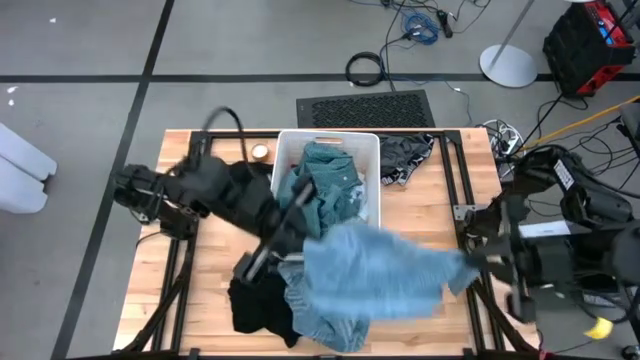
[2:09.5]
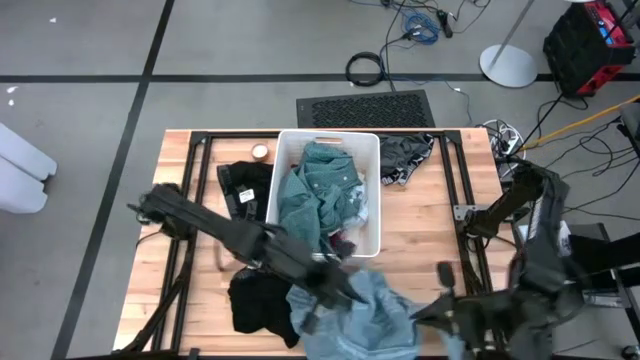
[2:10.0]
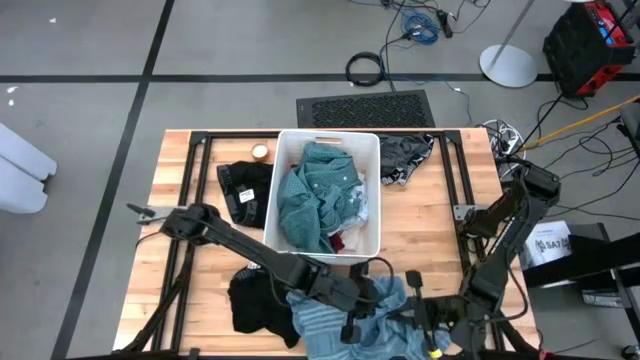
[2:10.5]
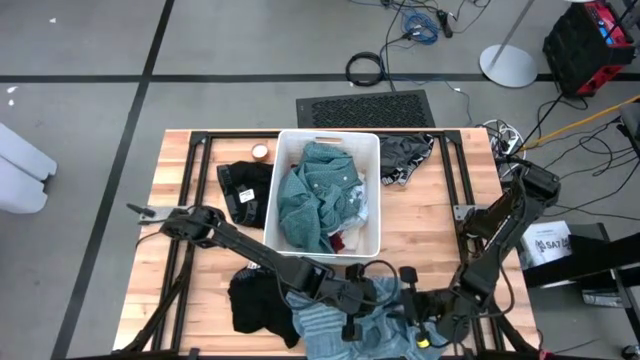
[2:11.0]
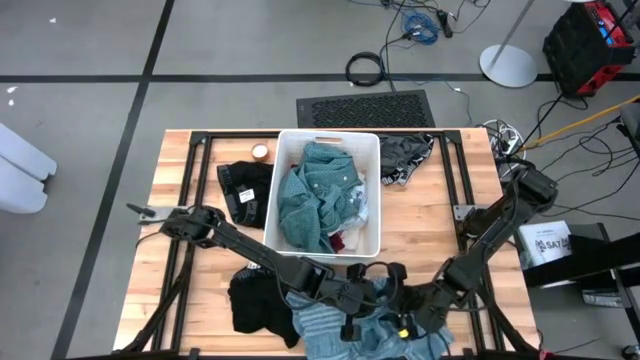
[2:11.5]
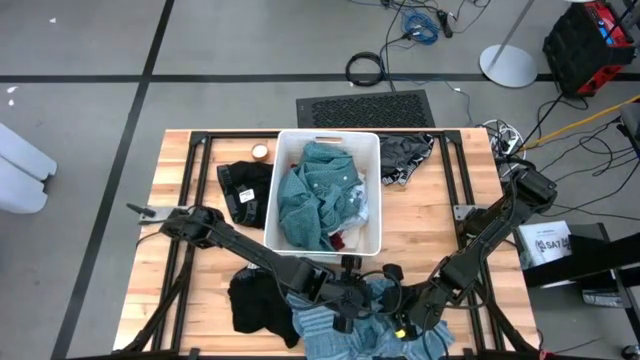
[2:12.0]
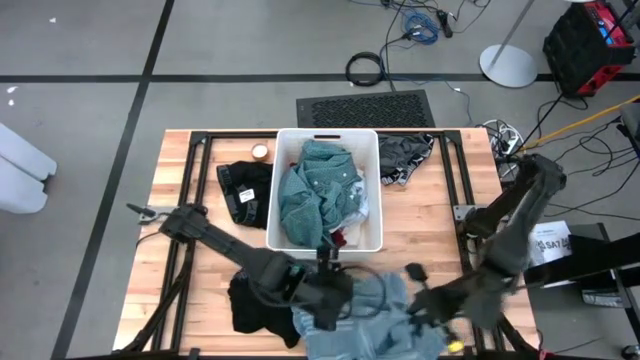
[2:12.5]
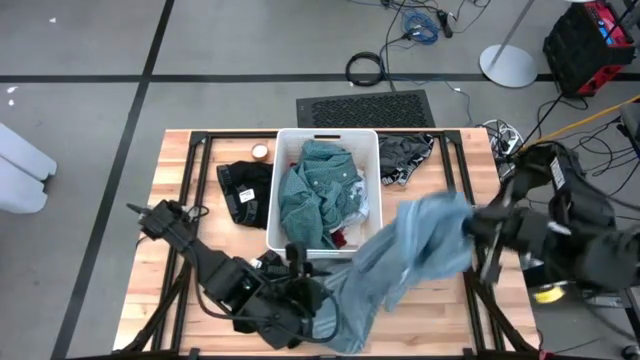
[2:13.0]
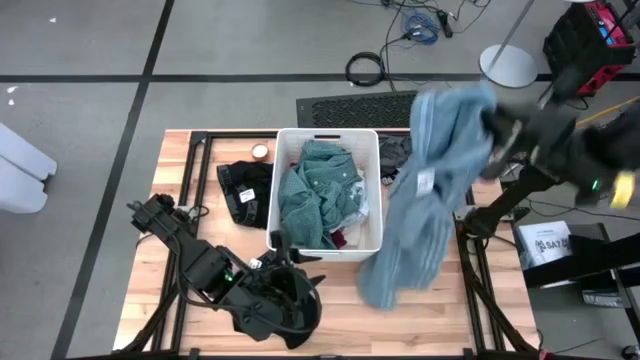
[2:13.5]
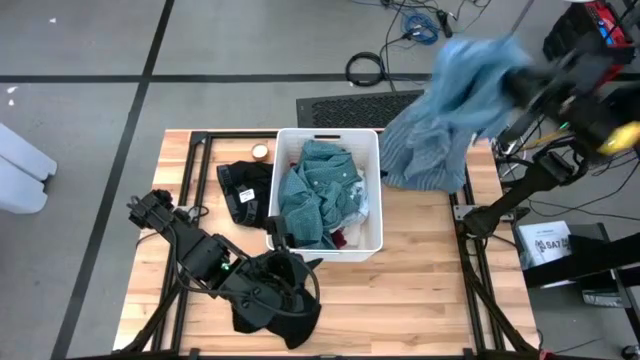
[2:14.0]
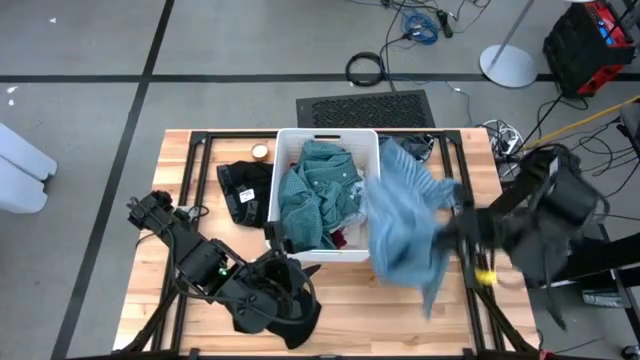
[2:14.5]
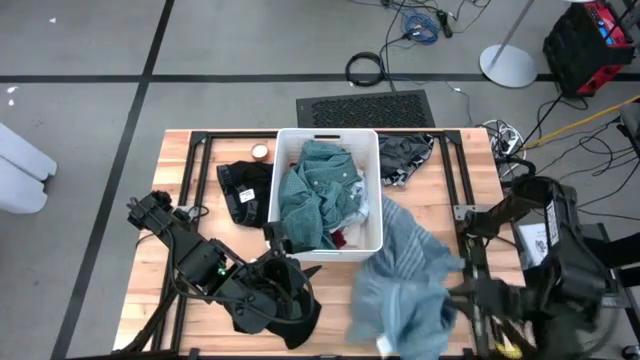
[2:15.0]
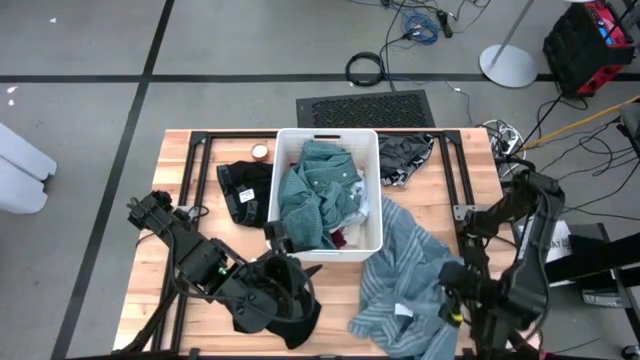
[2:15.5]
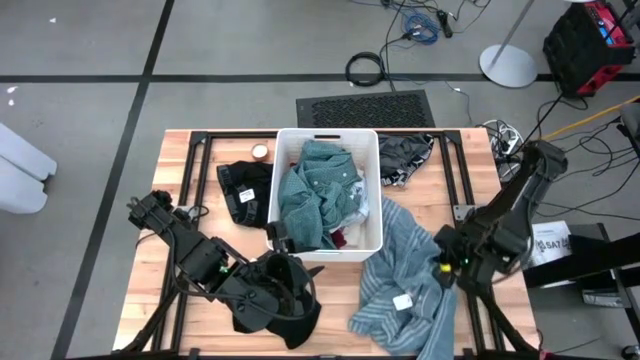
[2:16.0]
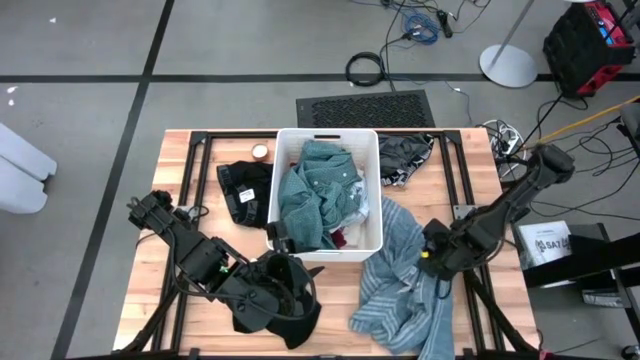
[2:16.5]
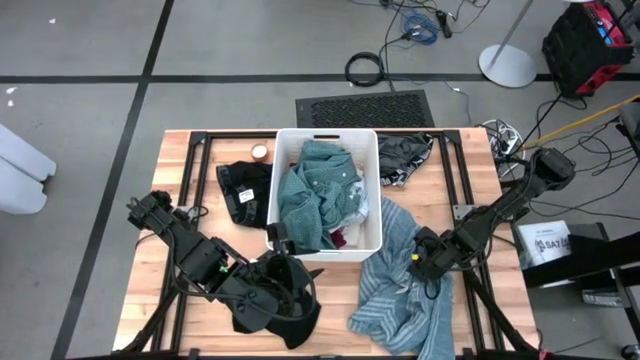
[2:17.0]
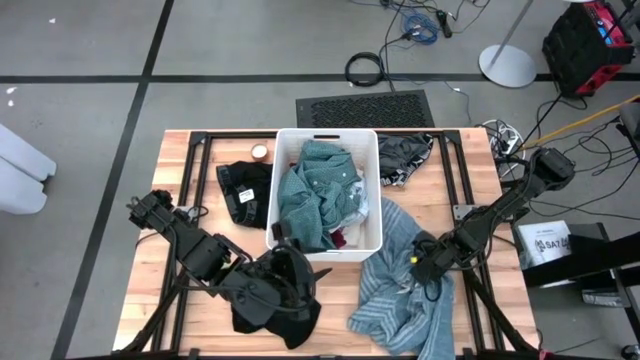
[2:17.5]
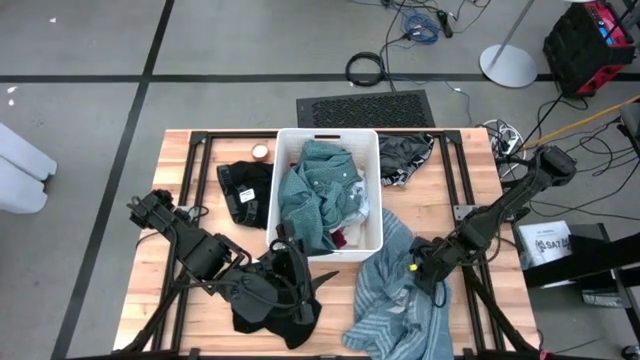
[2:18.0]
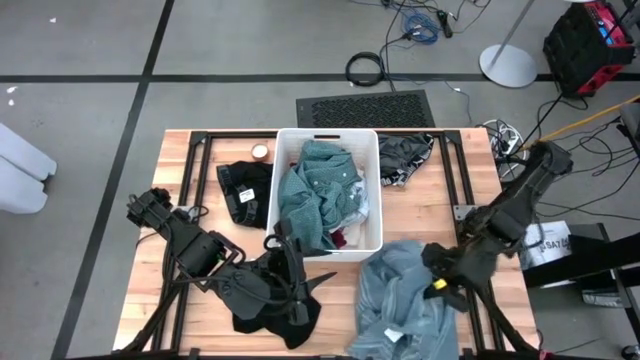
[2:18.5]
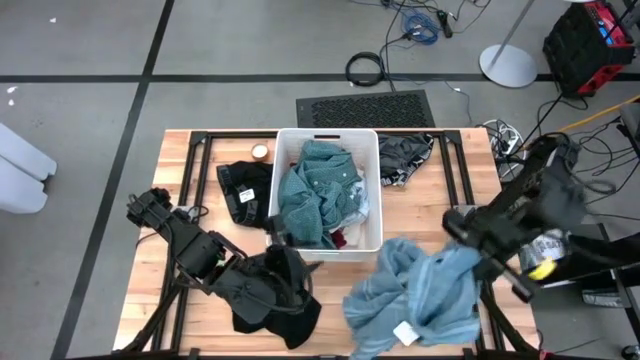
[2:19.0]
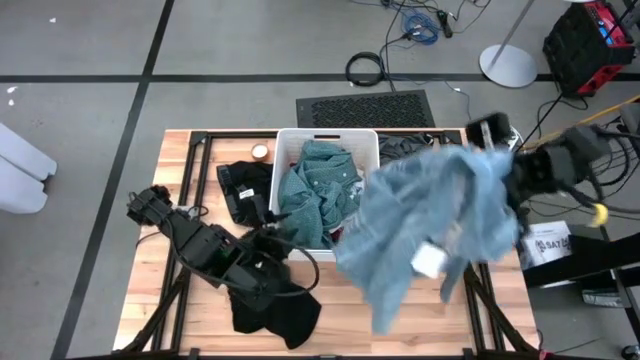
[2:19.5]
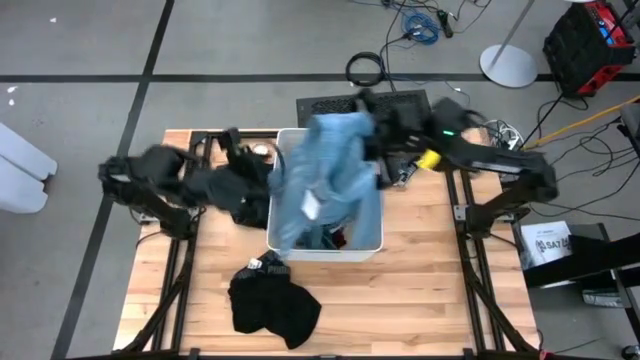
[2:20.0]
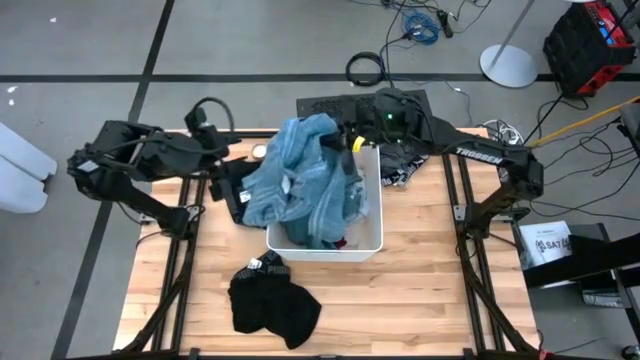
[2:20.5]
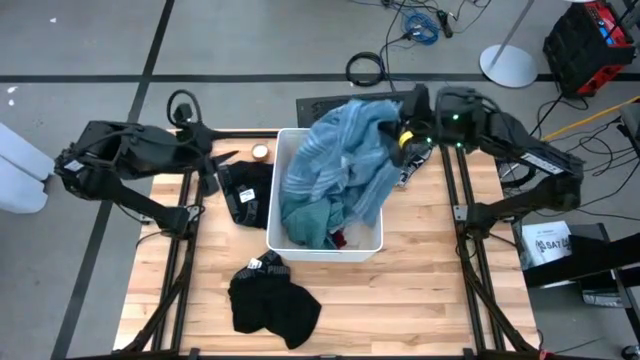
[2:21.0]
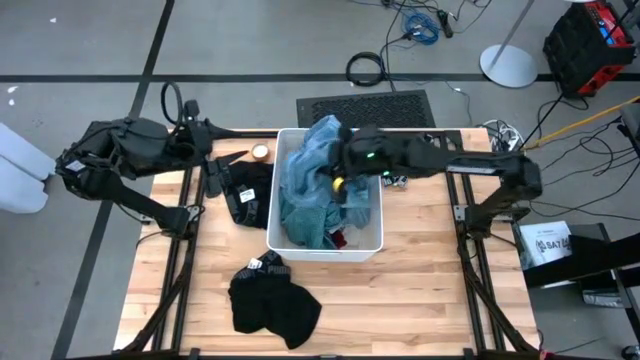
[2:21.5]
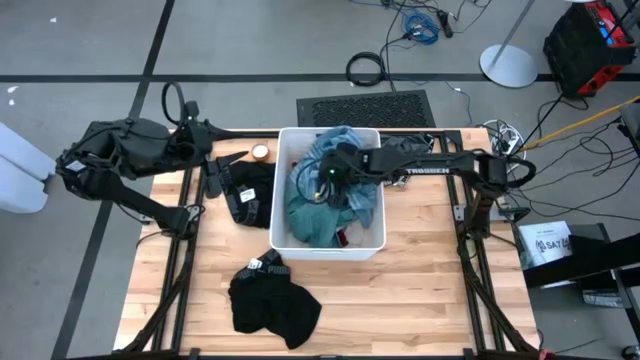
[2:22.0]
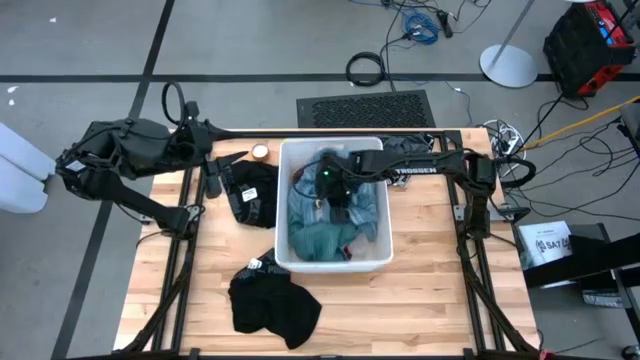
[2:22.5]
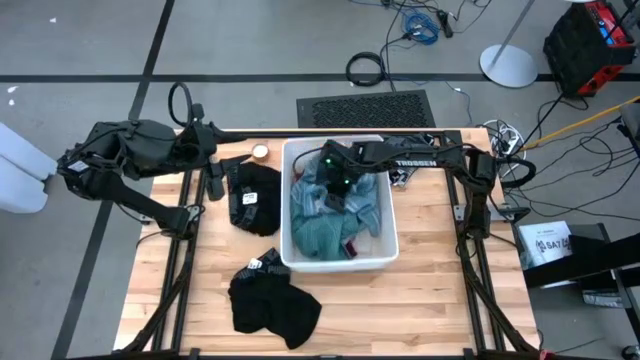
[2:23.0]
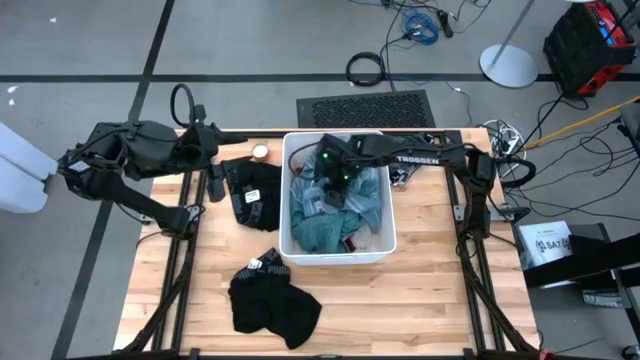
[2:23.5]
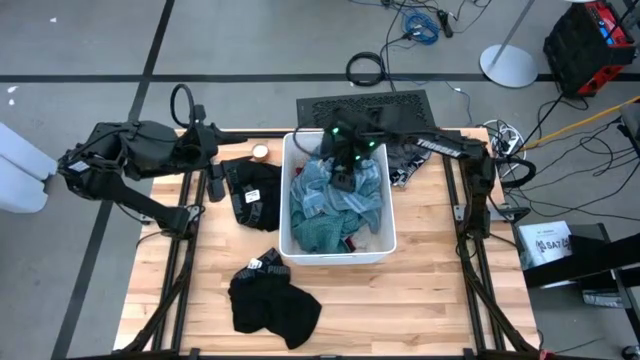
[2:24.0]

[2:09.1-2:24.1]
Task: Sort clothes
Put the blue patterned shirt into the laundry bin

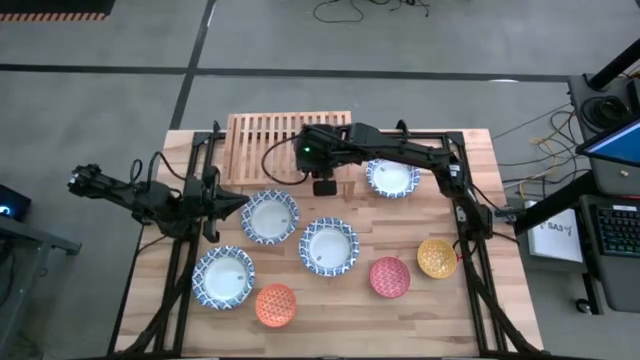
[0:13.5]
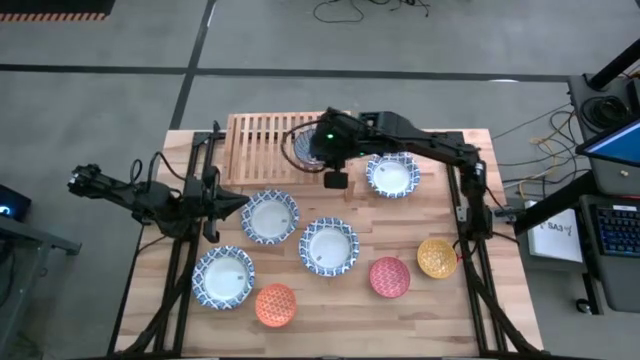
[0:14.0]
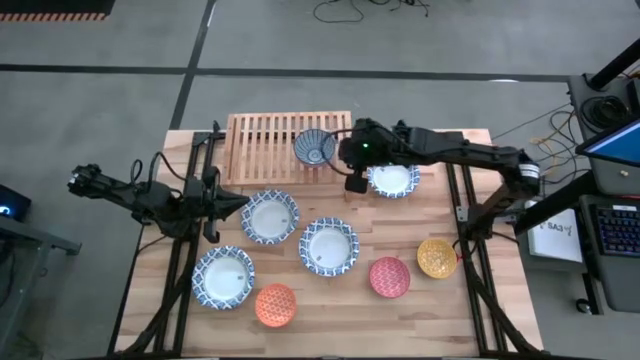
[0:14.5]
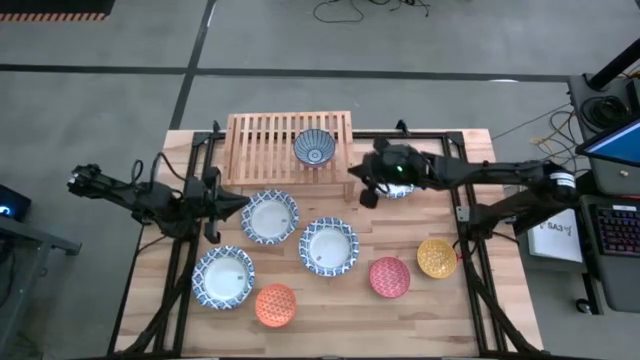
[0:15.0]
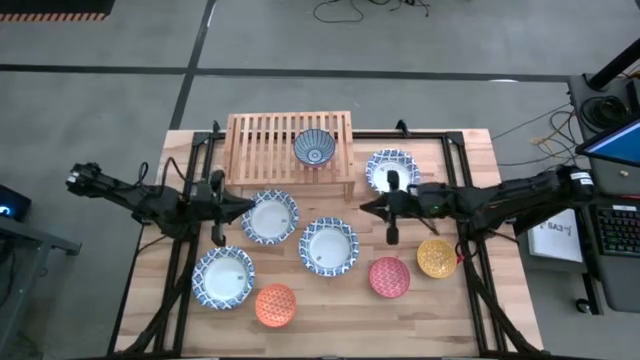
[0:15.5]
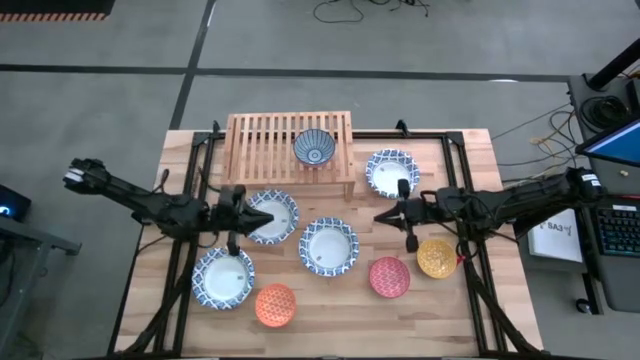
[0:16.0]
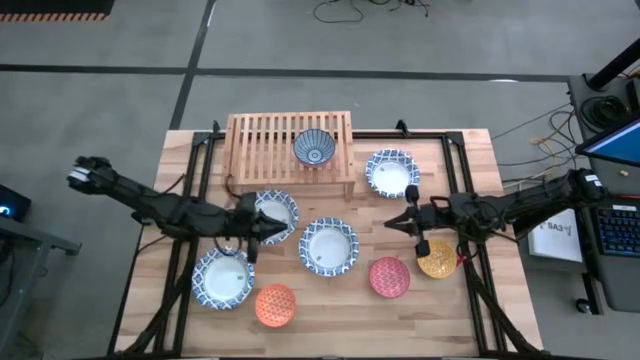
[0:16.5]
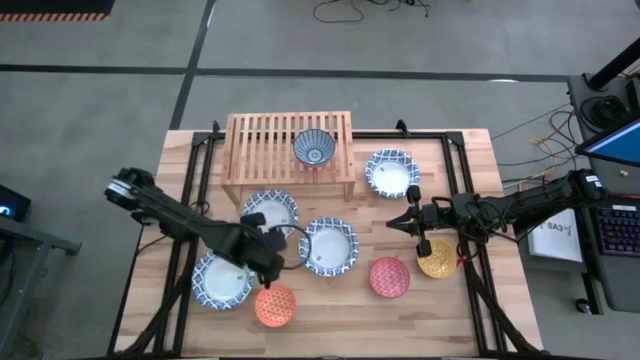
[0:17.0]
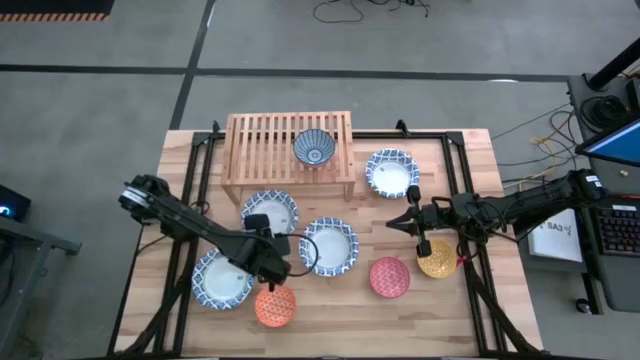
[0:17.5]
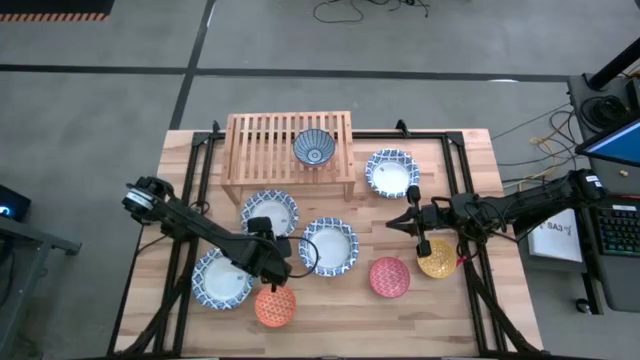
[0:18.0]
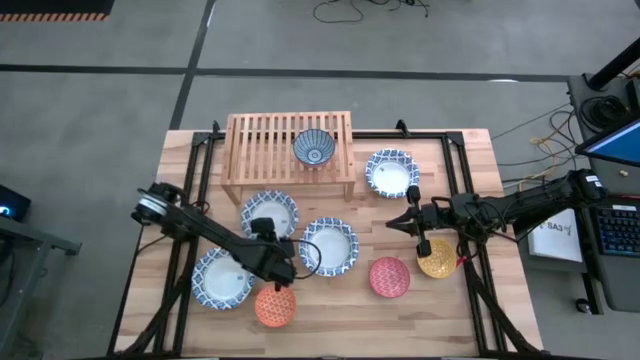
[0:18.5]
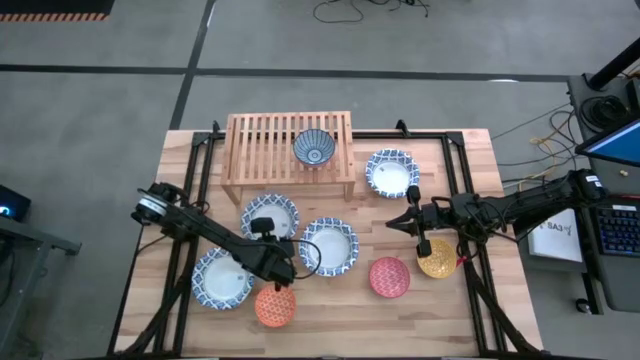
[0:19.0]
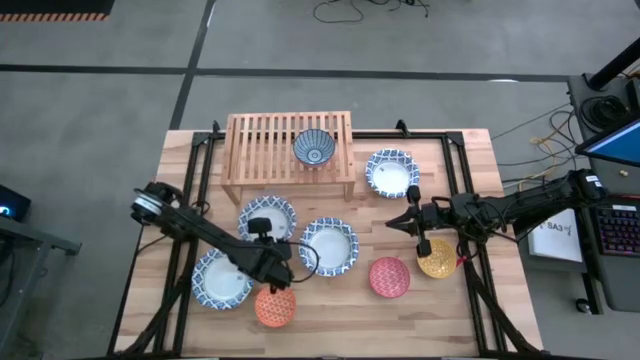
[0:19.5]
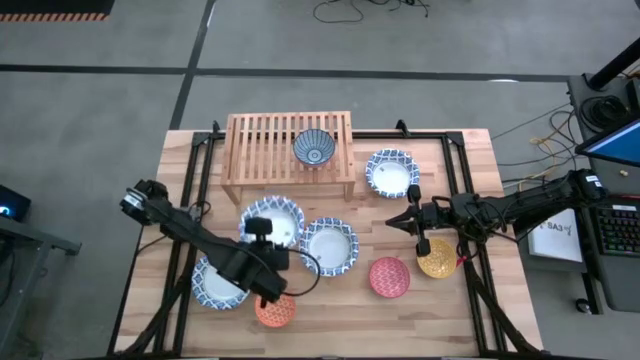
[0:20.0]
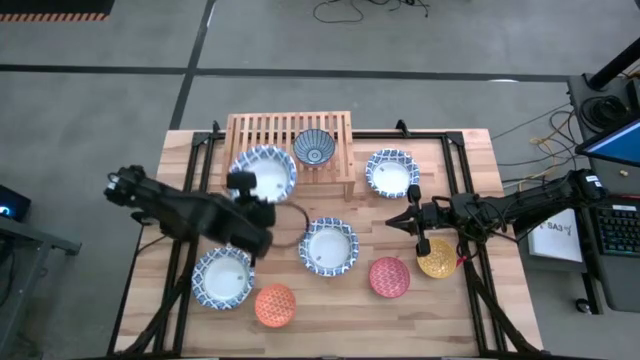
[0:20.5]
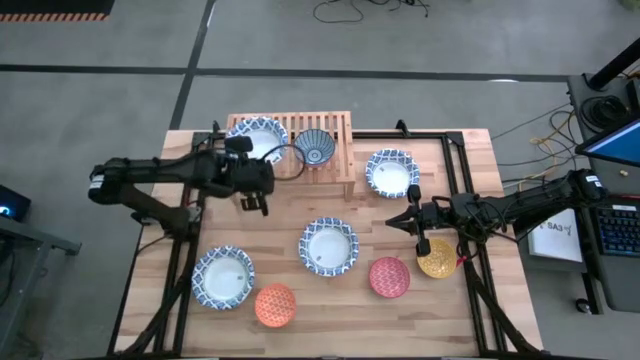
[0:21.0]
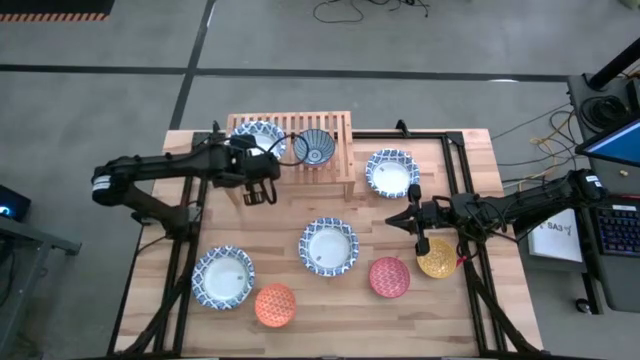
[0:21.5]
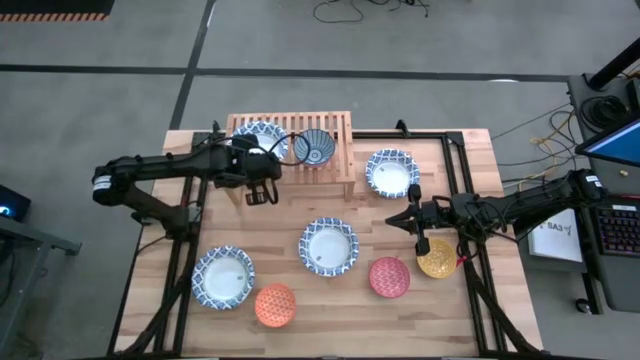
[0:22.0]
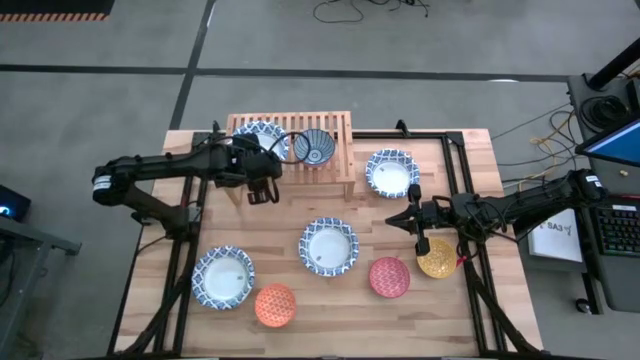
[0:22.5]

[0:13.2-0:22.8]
Task: Place and stack bowls onto a shelf
Put the white pattern bowl on the shelf
